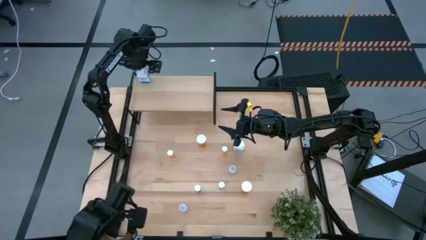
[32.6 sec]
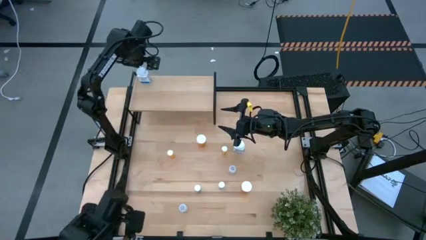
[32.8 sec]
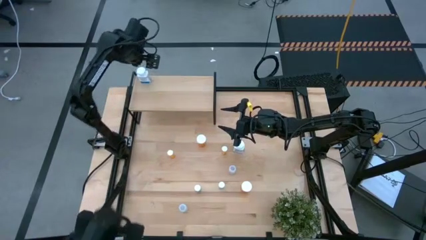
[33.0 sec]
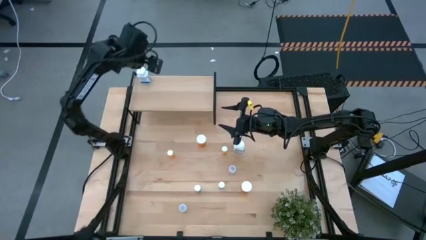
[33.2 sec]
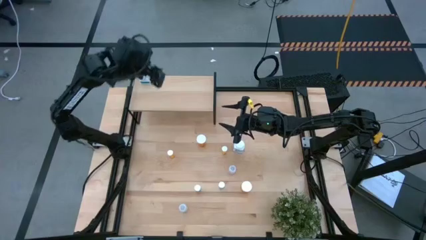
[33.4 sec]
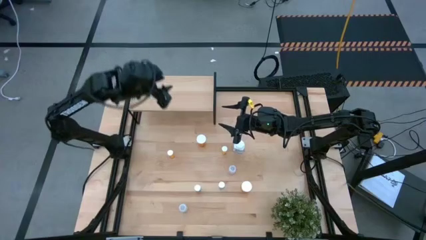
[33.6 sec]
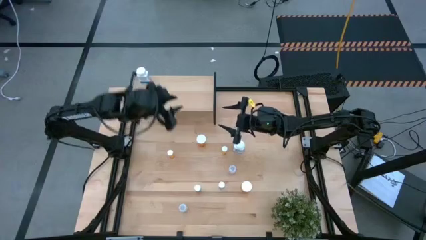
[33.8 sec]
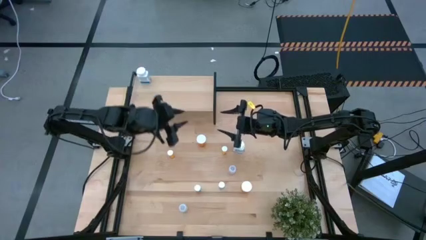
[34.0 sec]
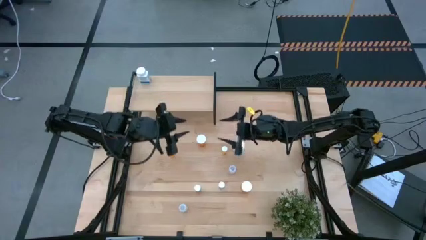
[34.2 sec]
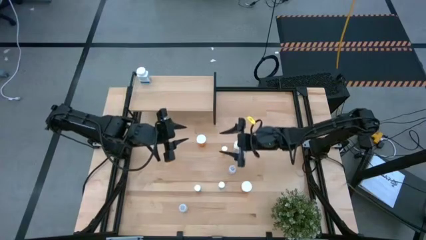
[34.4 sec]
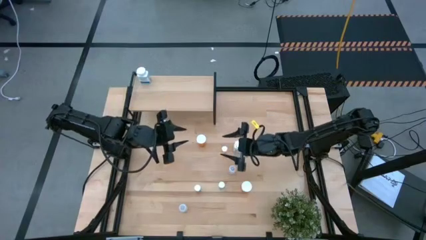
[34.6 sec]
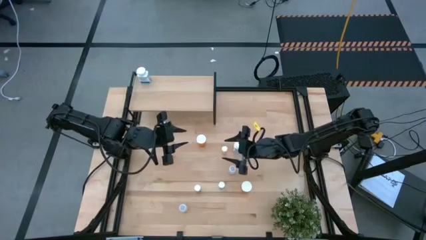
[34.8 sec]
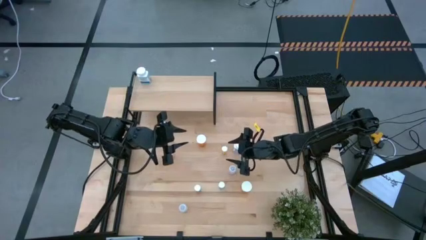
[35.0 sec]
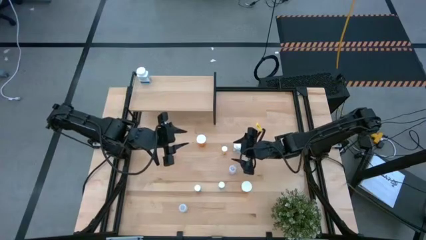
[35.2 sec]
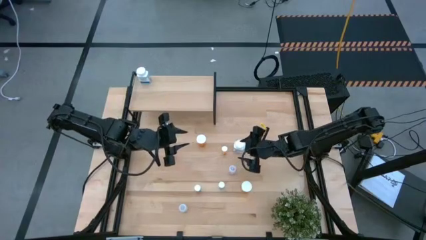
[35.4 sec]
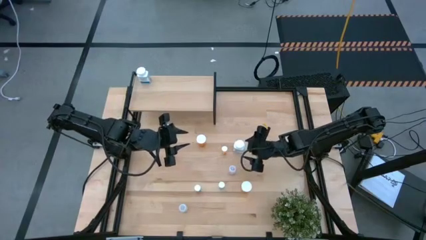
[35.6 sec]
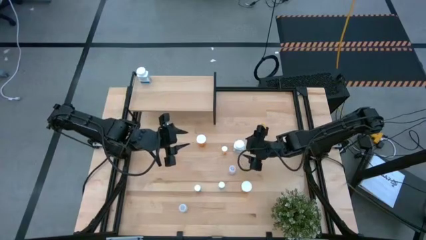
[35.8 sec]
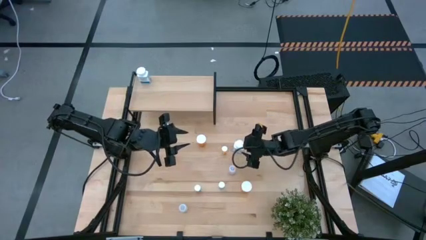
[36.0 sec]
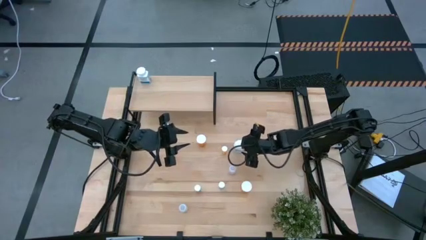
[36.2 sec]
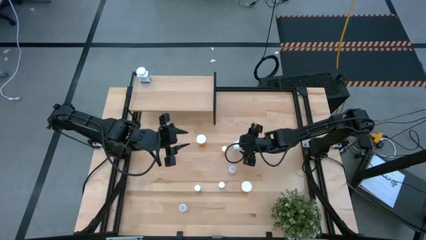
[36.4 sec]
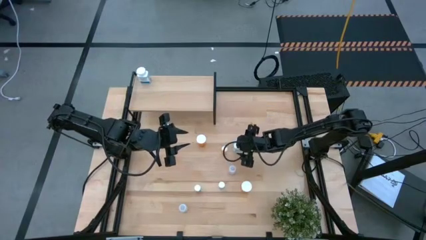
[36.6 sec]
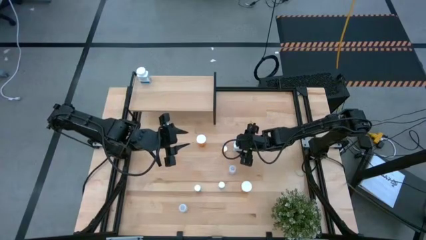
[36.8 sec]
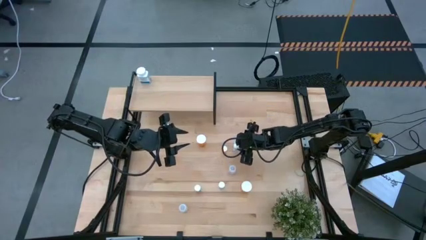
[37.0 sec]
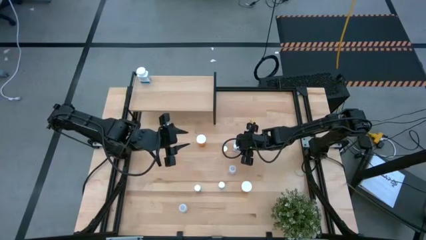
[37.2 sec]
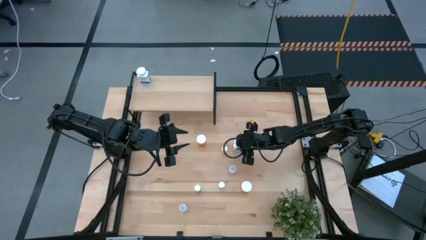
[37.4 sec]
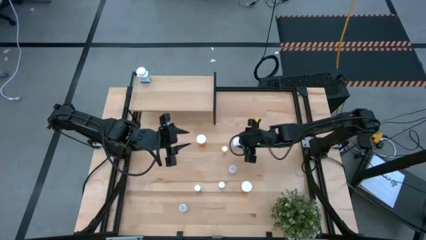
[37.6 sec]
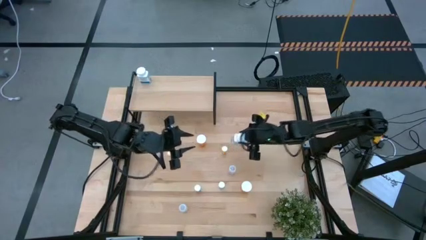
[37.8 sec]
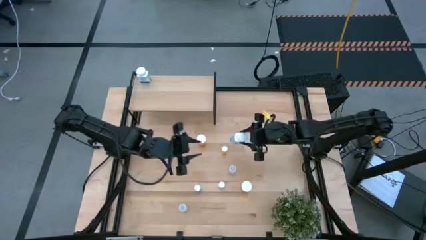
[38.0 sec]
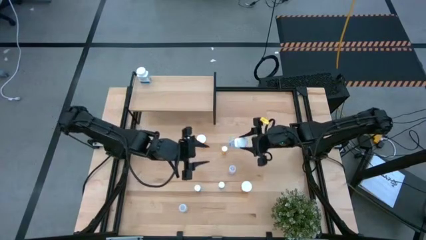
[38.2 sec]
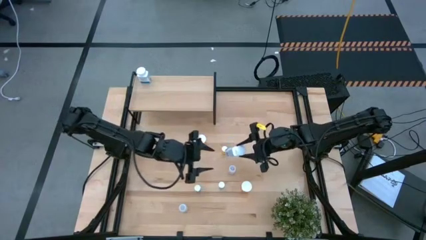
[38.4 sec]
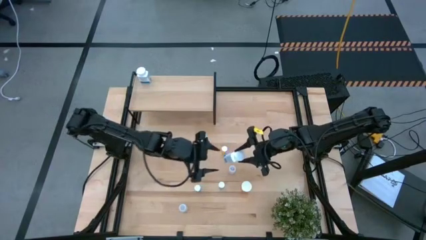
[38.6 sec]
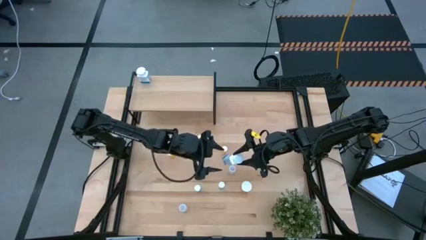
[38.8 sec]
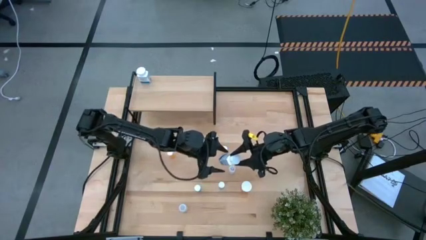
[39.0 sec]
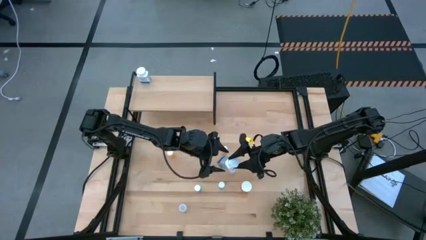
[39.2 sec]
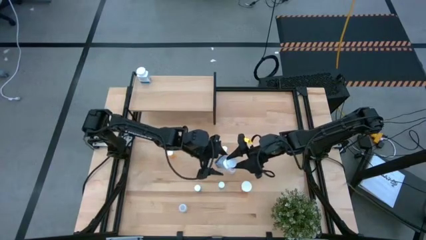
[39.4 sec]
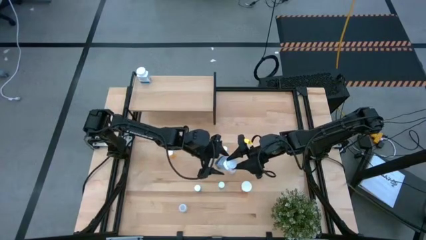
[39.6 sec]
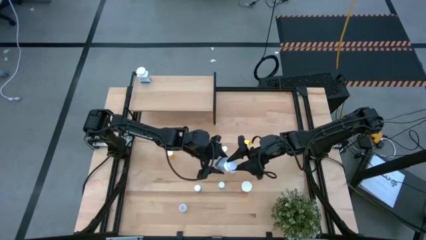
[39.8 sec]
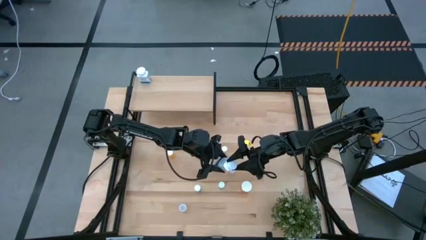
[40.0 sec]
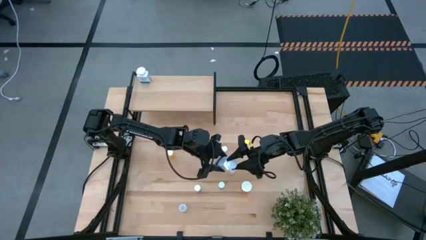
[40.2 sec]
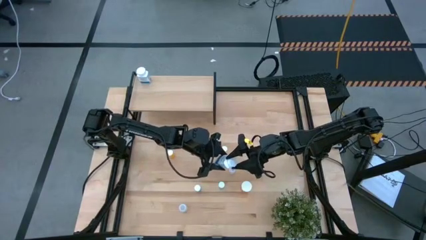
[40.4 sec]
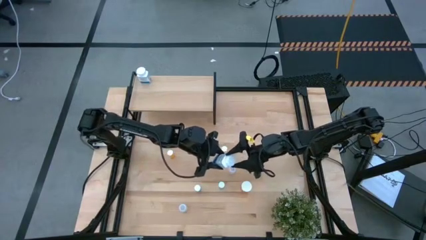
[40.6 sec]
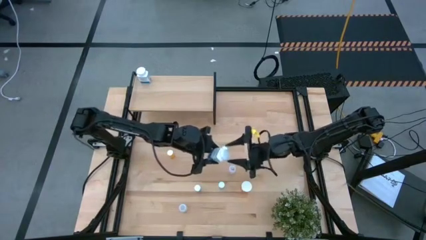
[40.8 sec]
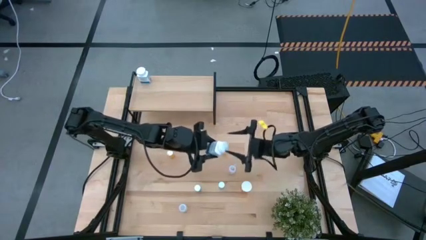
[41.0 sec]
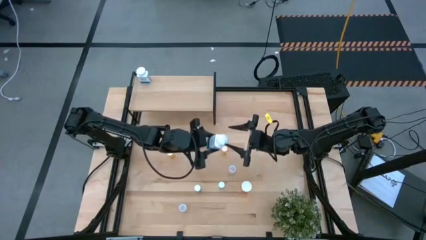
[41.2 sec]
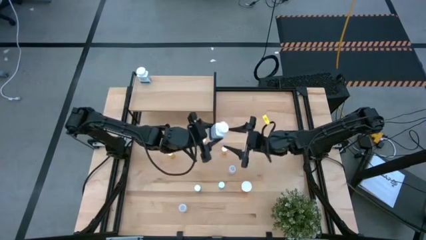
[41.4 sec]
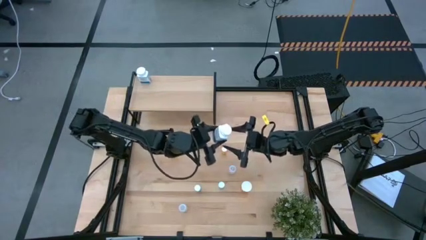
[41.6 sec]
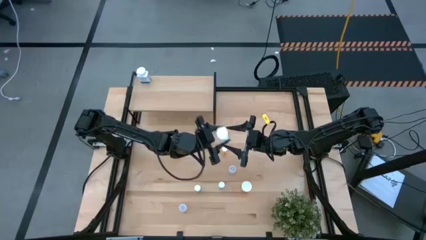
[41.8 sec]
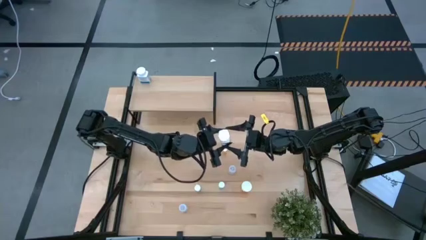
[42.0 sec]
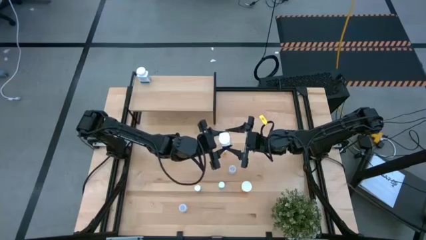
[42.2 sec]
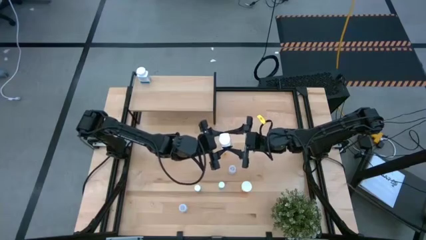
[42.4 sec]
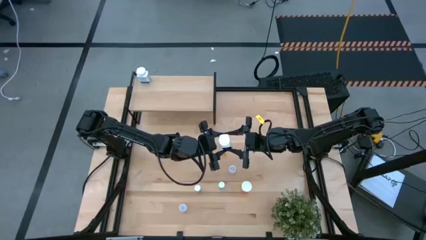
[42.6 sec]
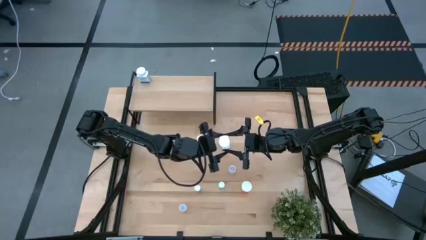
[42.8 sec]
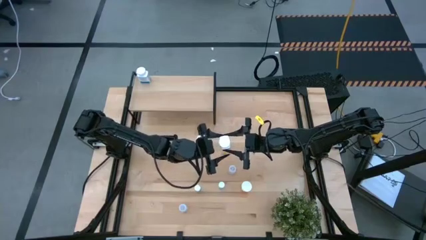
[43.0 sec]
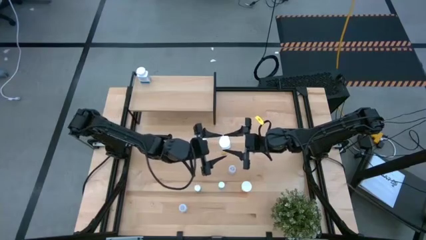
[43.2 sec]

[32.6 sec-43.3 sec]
Task: Pick and place medicine bottles onto shelf by color
Put the white pill bottle on the shelf aligned with the other white pill bottle

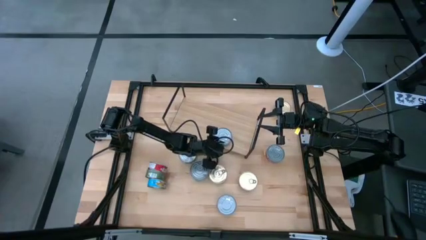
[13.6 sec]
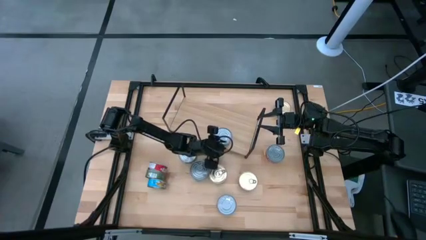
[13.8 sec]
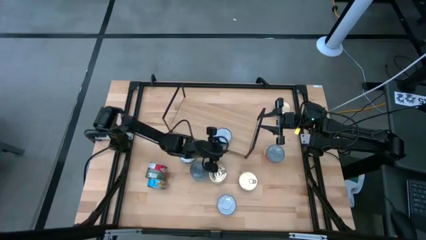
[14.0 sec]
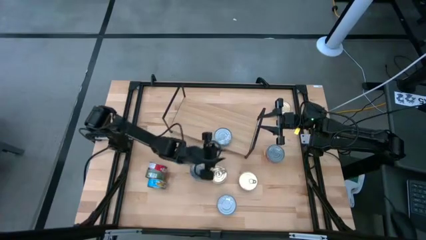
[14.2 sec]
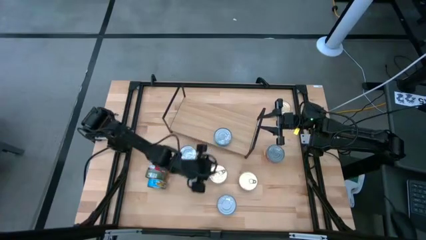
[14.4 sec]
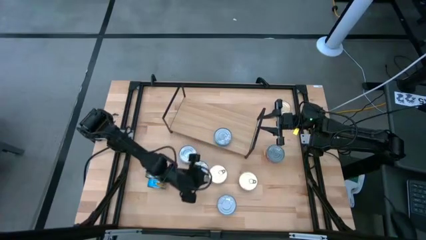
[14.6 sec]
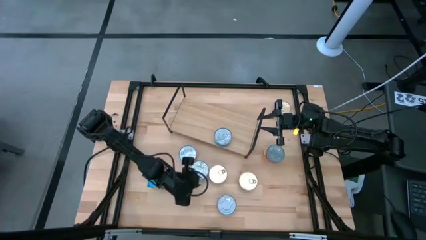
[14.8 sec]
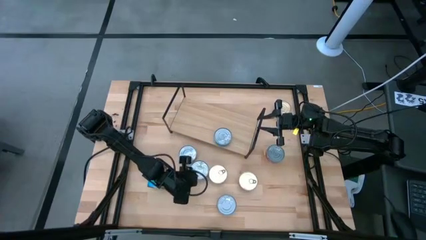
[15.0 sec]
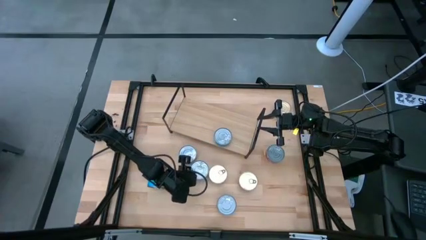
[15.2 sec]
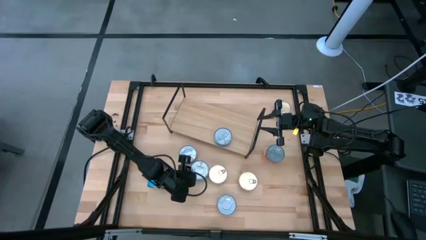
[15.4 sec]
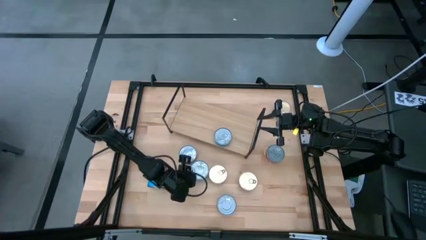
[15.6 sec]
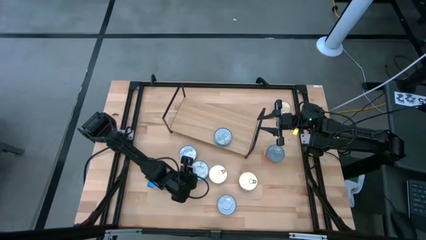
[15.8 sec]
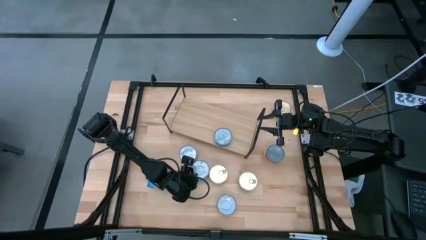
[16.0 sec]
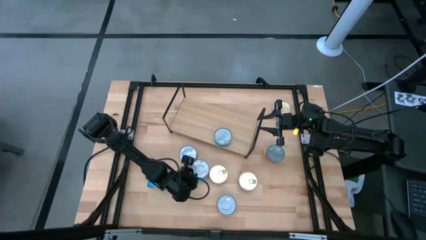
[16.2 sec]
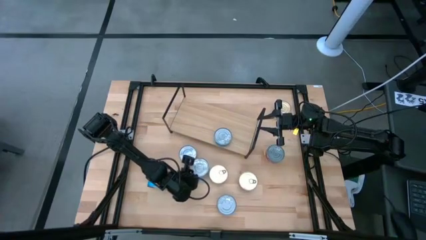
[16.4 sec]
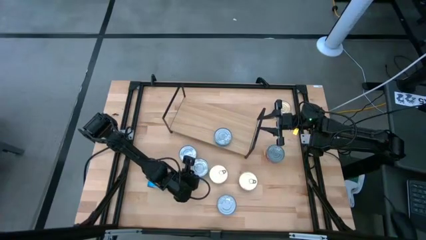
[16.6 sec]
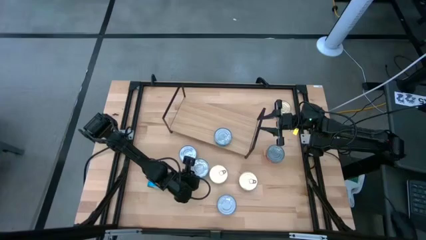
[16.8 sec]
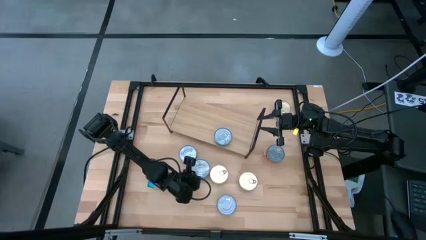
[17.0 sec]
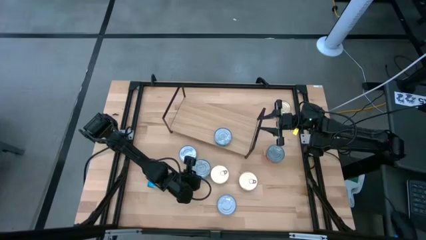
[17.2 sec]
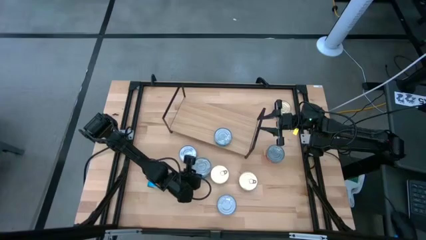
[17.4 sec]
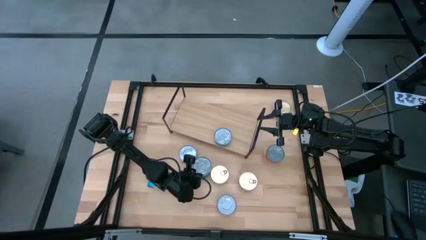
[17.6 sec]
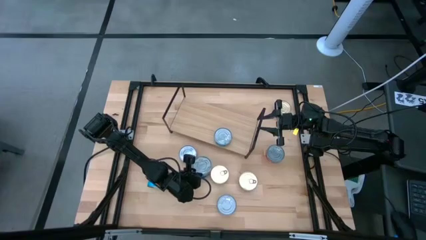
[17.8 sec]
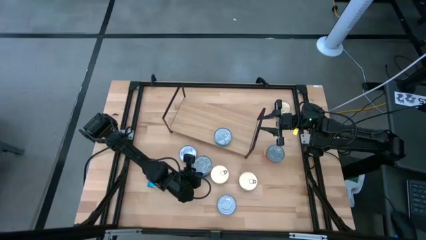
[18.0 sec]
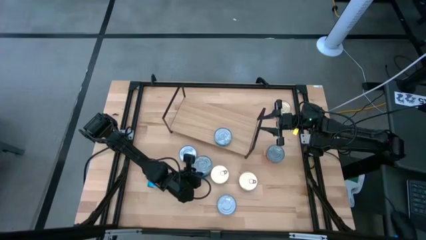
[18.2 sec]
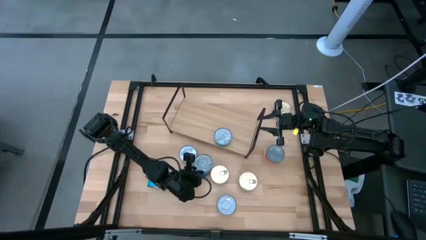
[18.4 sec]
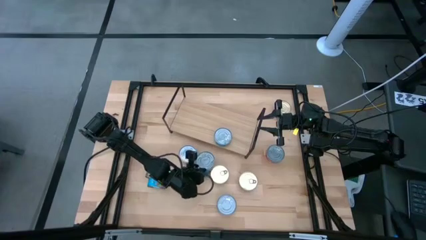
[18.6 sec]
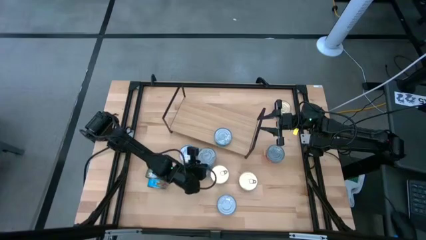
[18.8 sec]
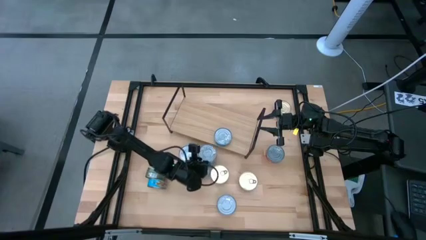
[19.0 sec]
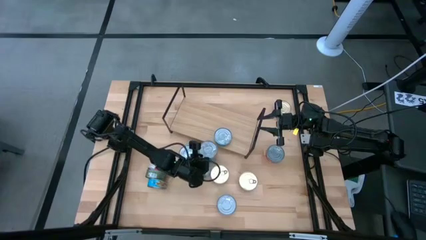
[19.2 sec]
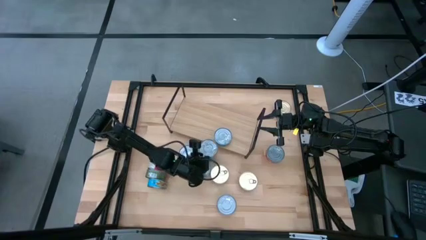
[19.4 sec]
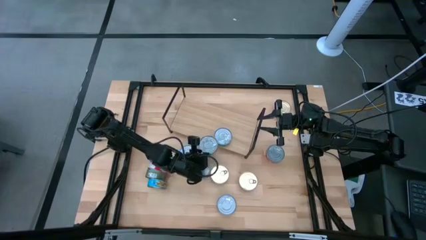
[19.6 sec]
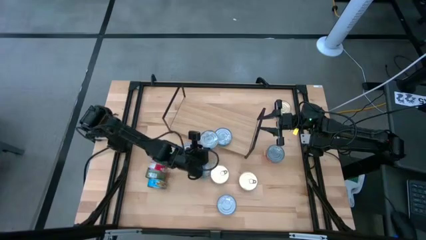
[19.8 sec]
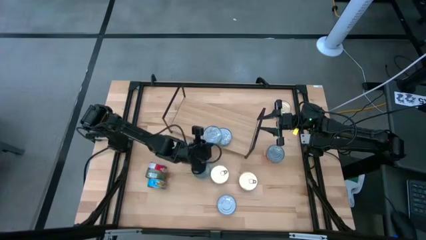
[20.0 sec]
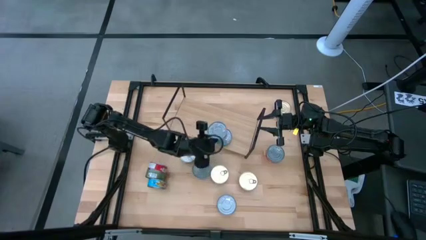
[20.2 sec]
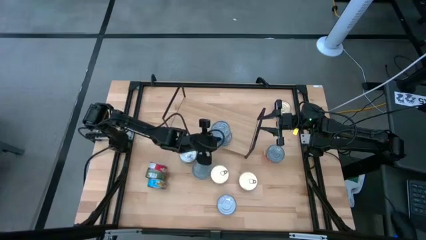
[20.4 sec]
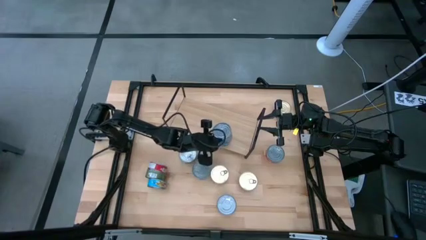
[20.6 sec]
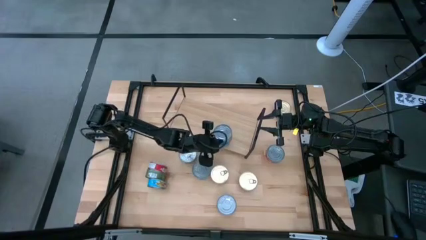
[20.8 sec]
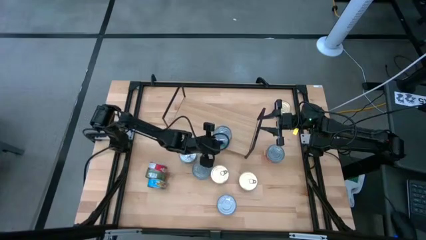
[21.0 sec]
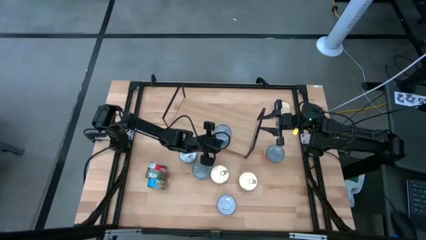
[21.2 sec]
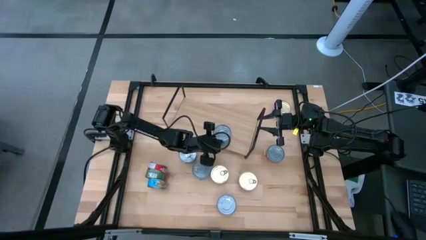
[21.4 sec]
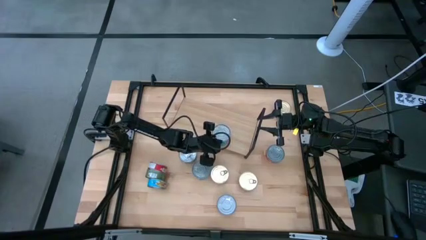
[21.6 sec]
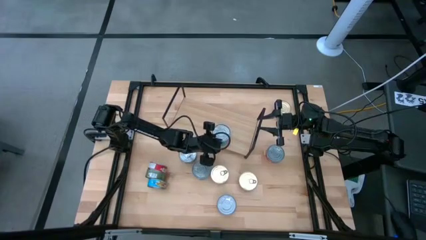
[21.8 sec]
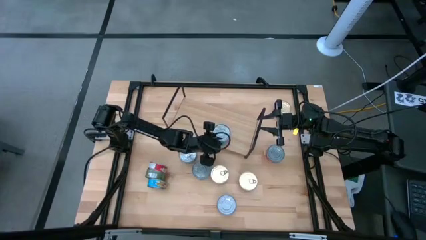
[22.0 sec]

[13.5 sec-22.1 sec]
Task: Stack canned seafood by type on shelf
Stack the yellow-blue tuna can on top of the yellow-blue tuna can on the shelf
